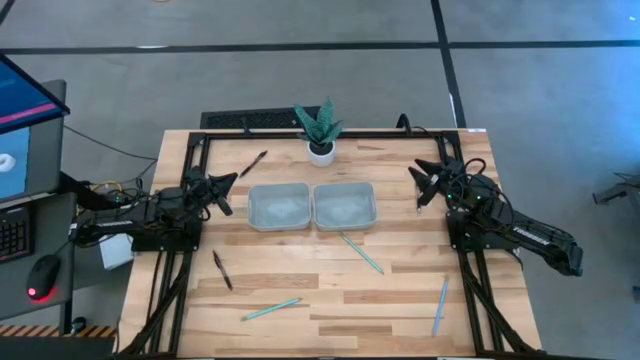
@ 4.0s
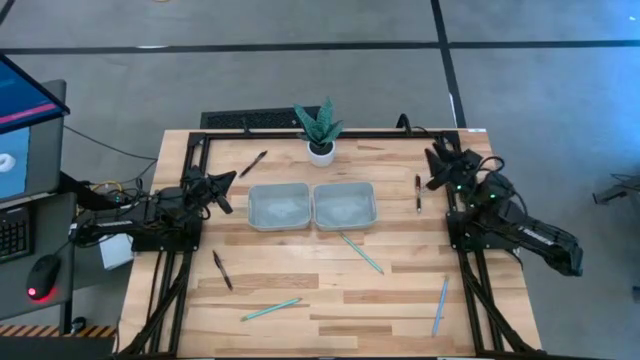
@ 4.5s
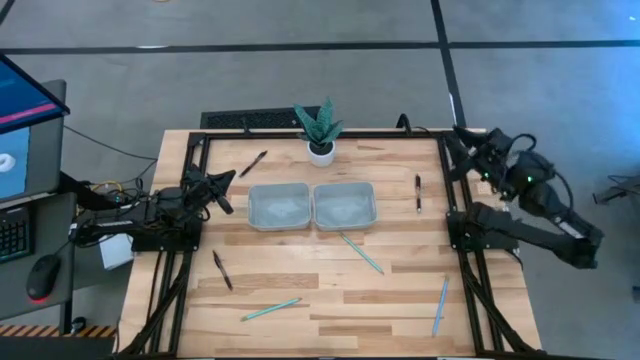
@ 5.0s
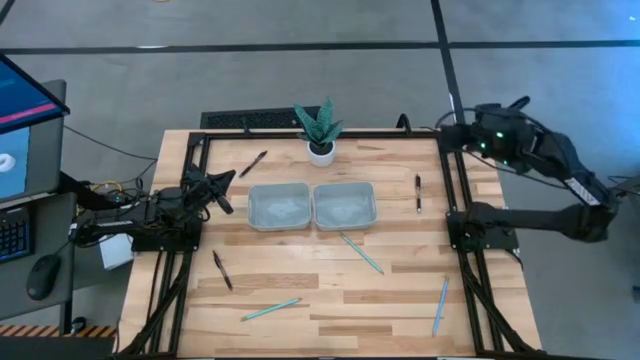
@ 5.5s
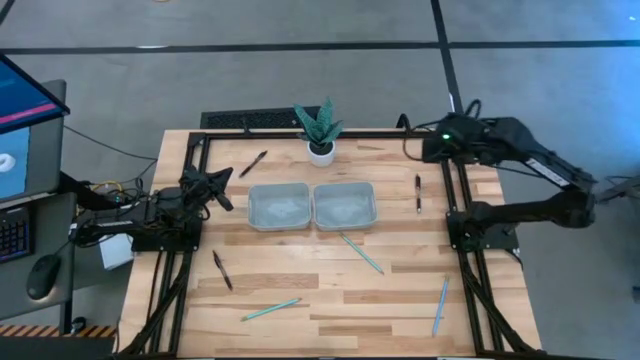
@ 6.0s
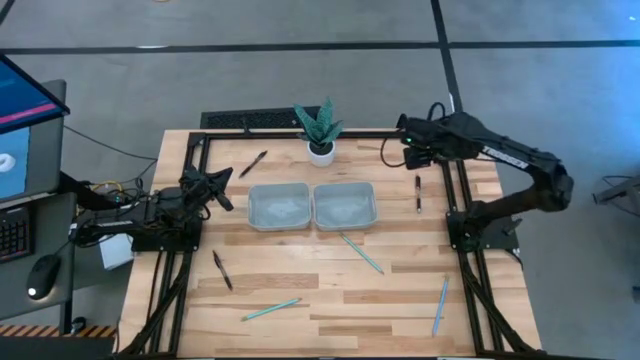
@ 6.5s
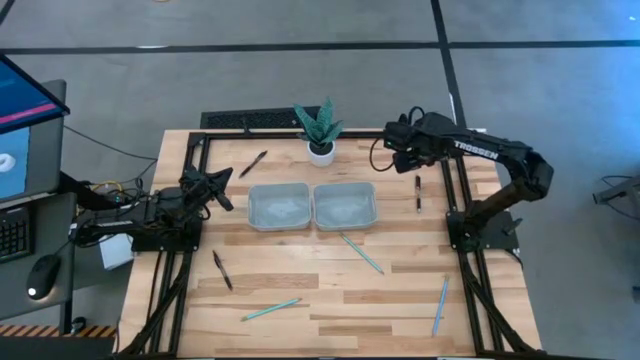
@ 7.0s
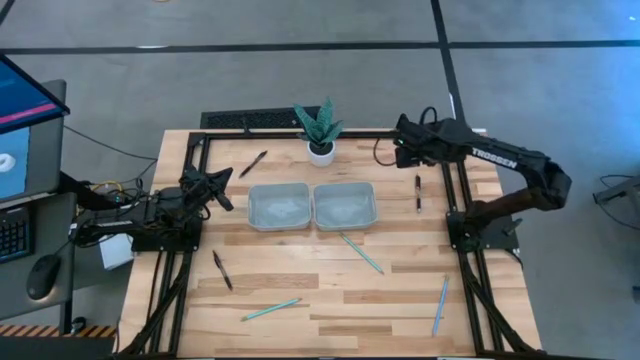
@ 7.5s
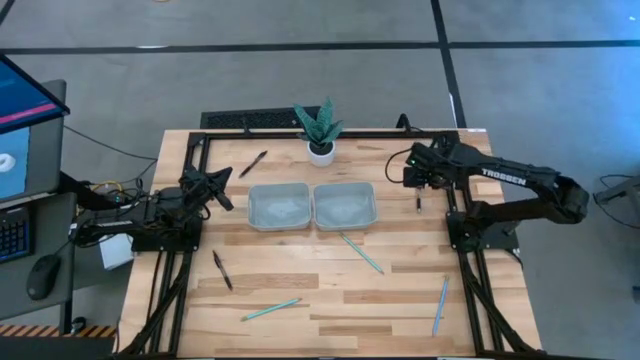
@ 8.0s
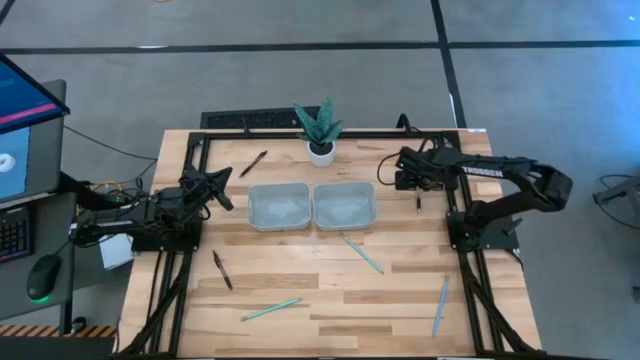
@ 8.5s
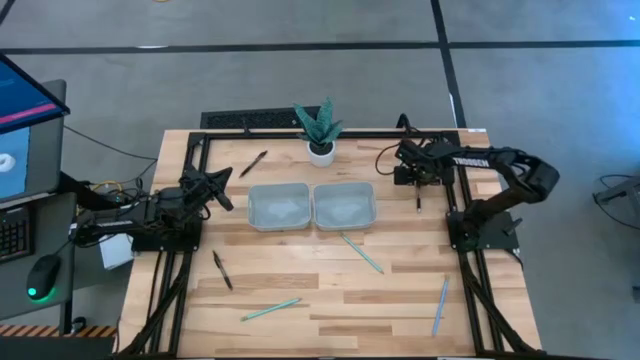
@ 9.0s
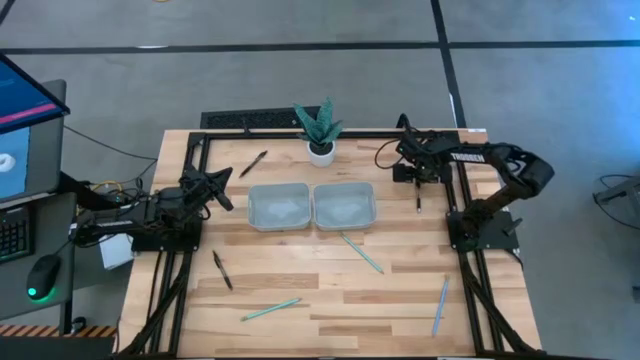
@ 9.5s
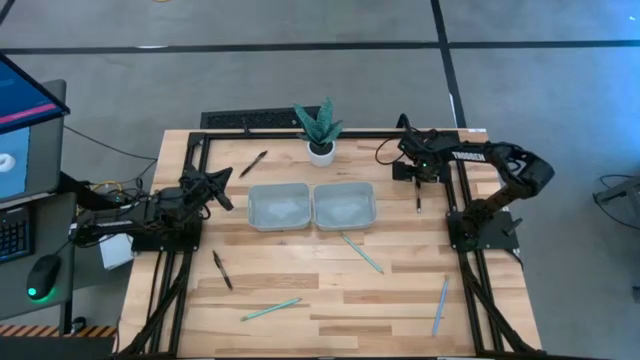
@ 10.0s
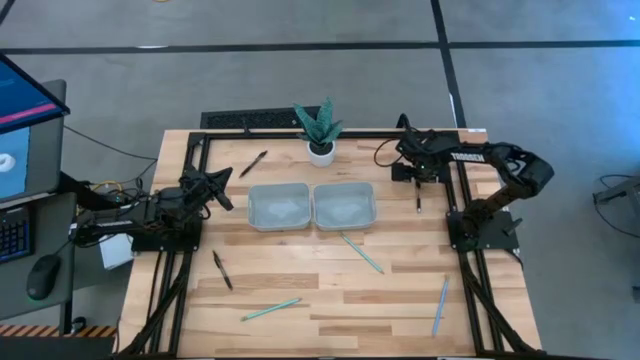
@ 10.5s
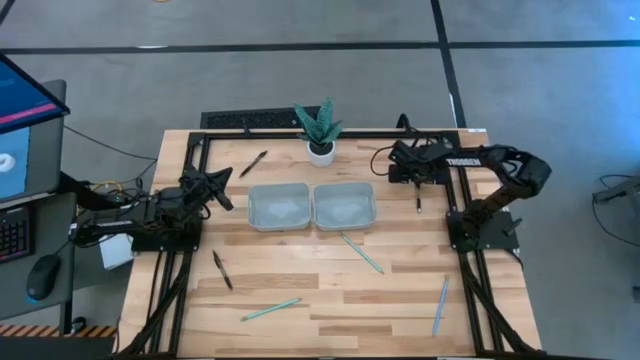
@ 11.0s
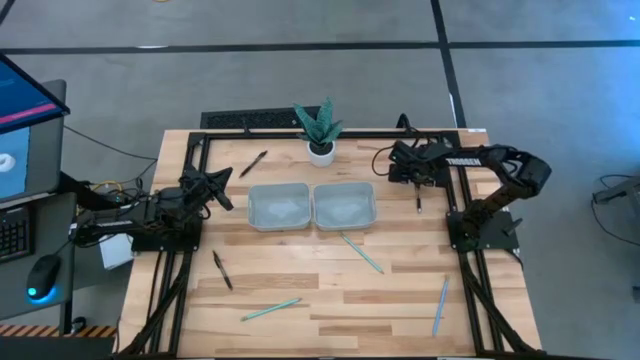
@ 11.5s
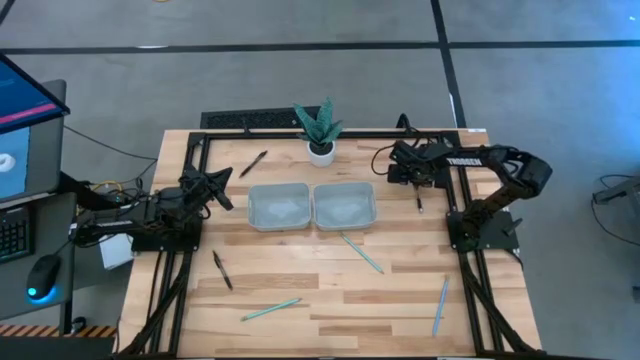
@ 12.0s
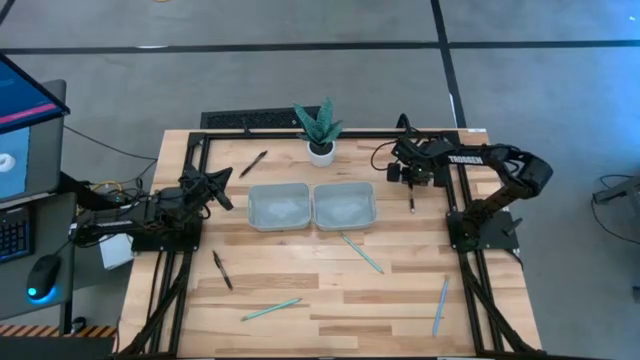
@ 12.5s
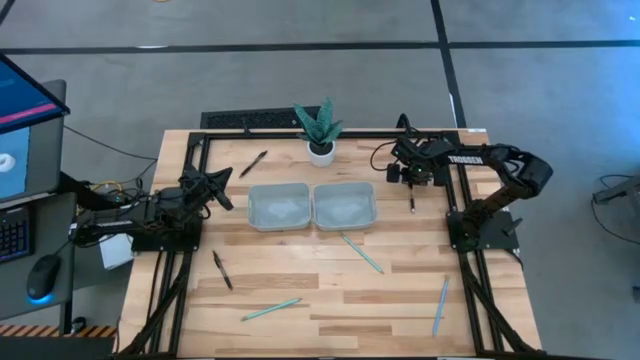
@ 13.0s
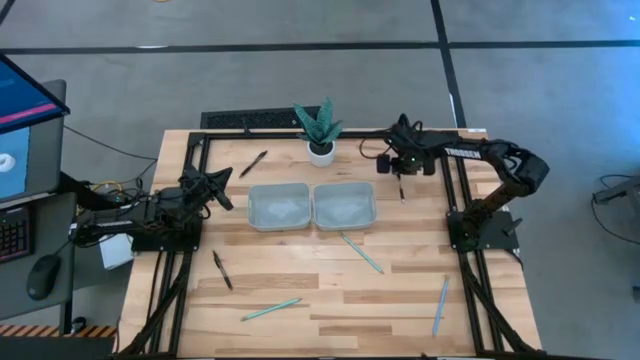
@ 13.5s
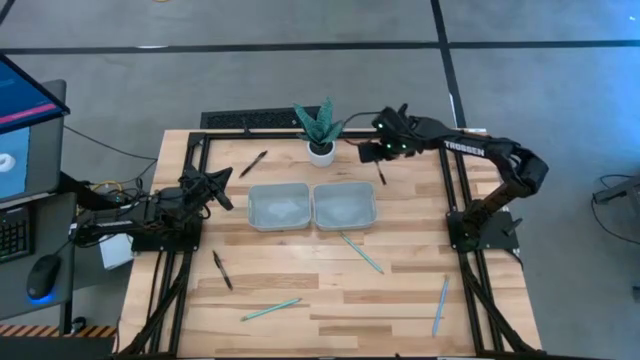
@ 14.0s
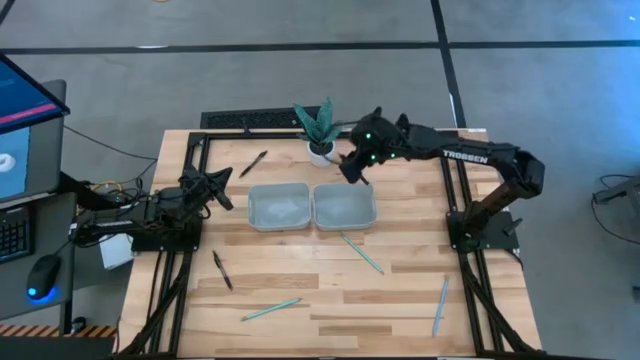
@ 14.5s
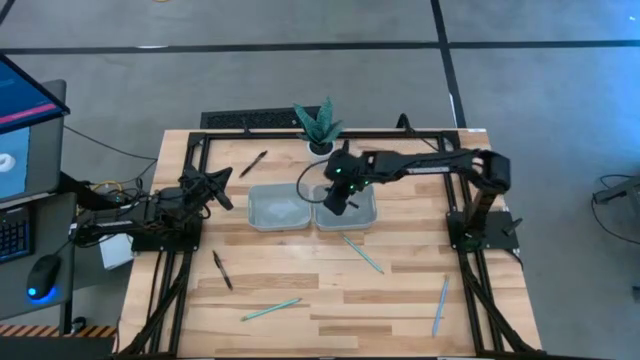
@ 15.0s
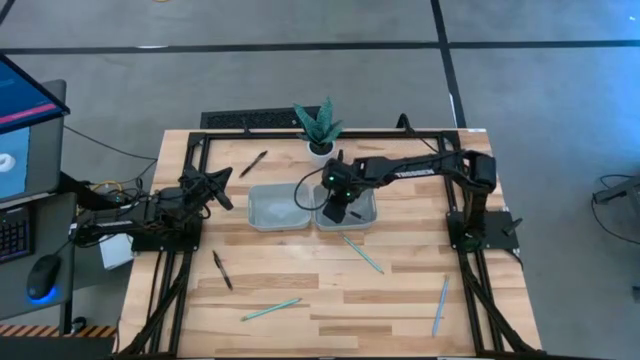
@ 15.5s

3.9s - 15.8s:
Task: Sort pens & pencils
Put the top right black pen into the right gray bin

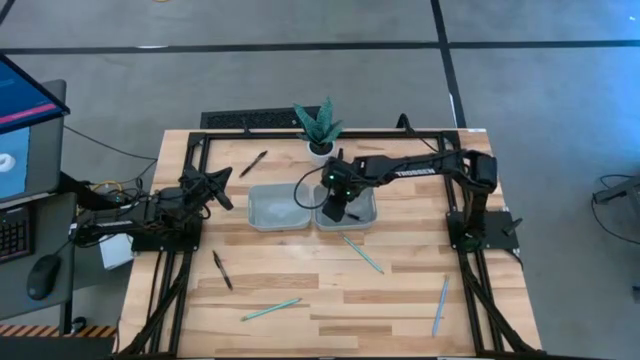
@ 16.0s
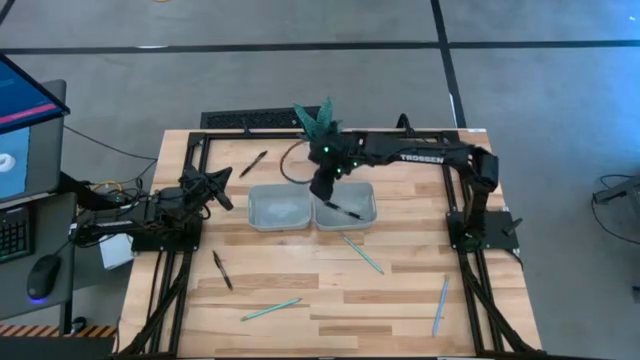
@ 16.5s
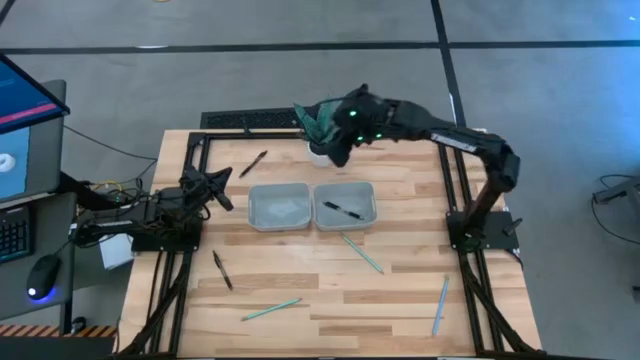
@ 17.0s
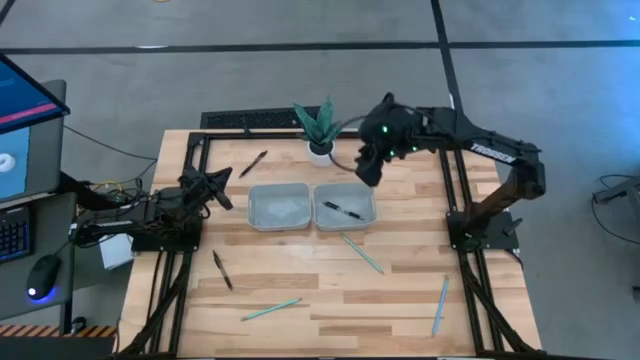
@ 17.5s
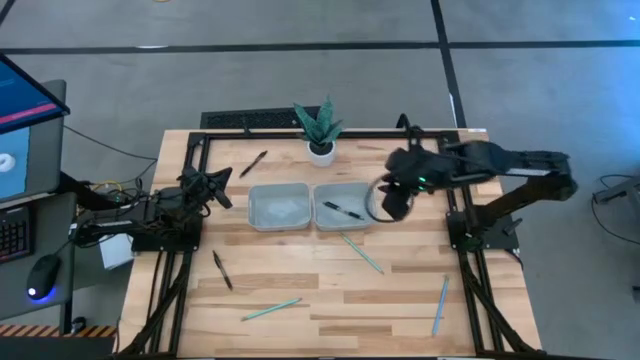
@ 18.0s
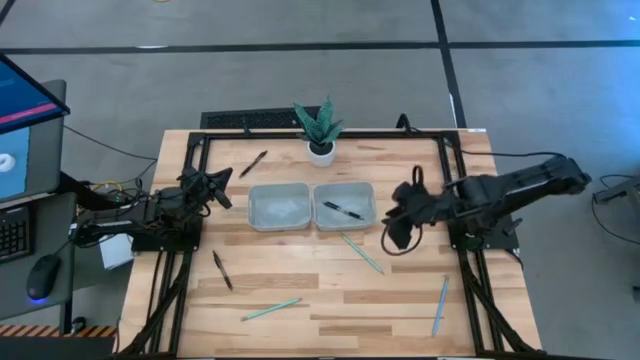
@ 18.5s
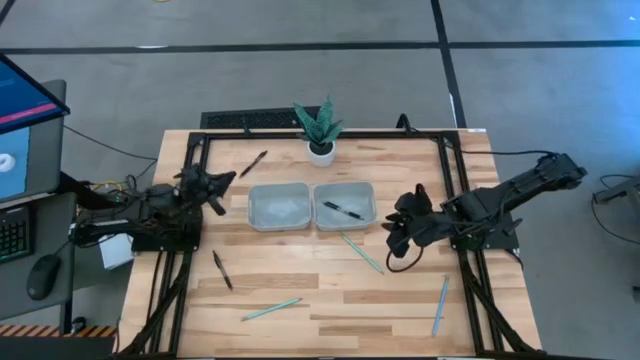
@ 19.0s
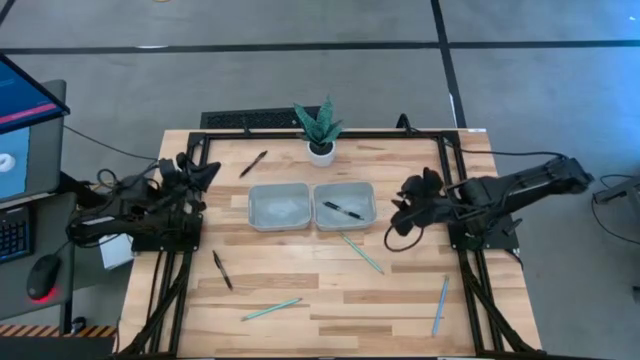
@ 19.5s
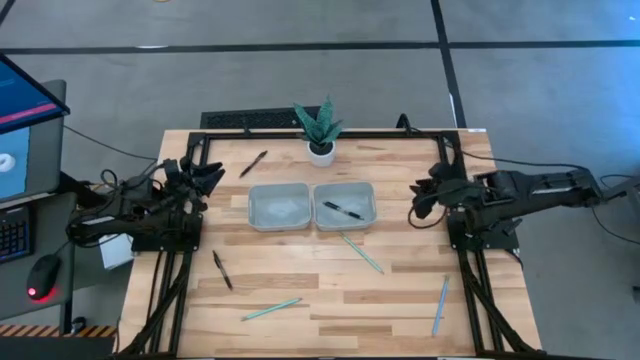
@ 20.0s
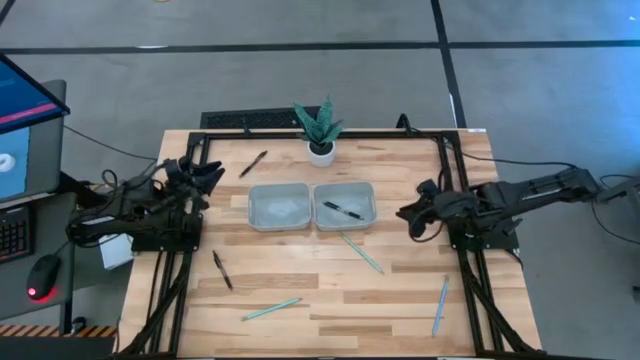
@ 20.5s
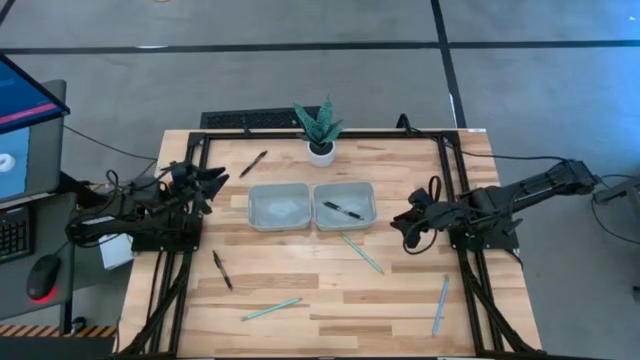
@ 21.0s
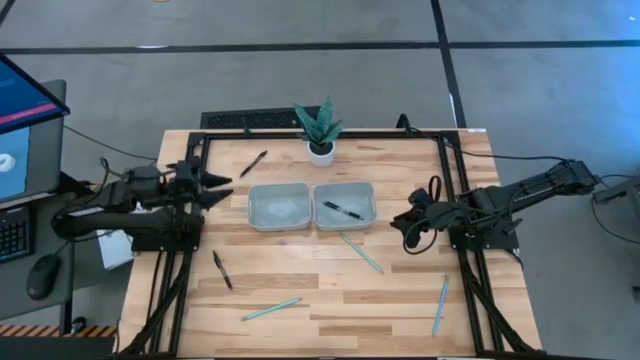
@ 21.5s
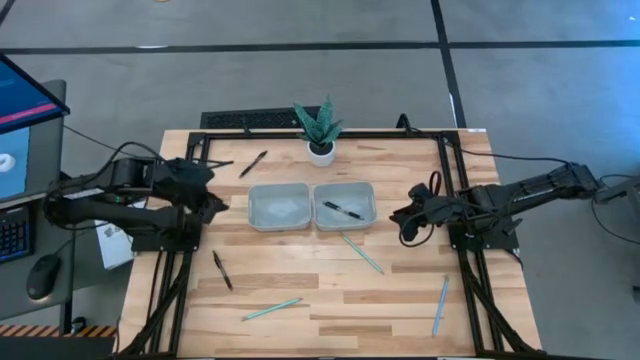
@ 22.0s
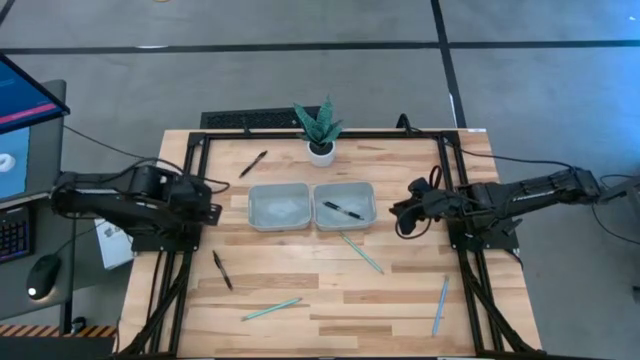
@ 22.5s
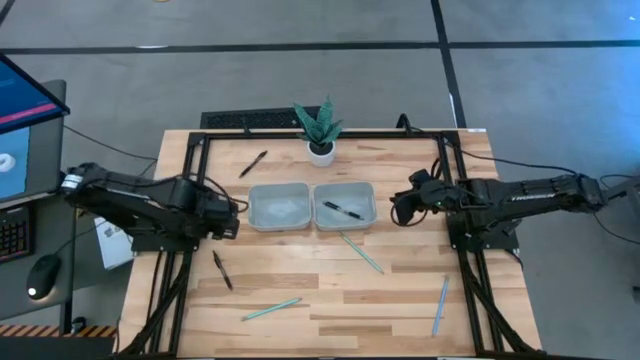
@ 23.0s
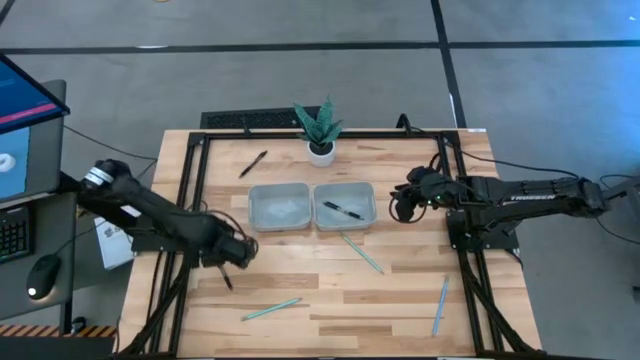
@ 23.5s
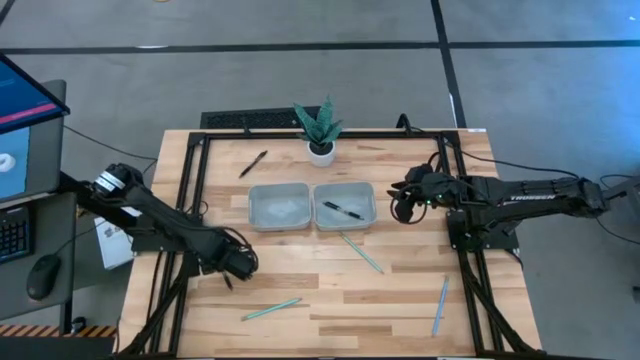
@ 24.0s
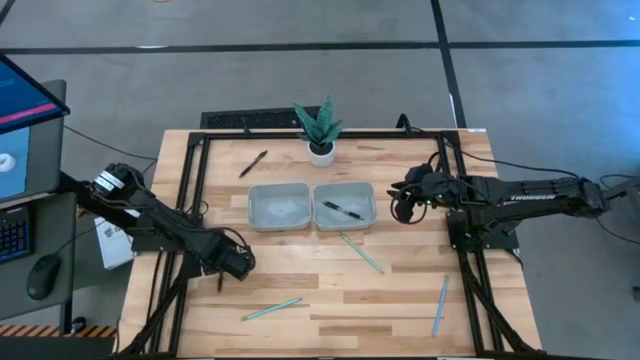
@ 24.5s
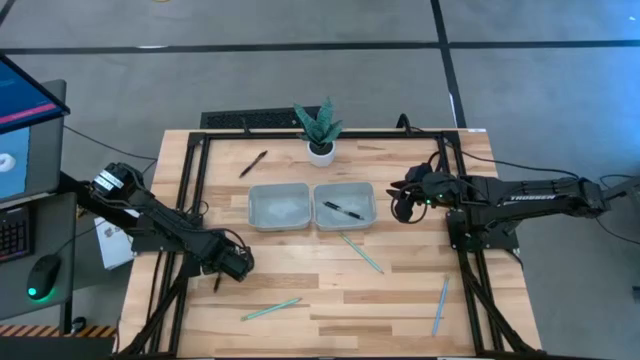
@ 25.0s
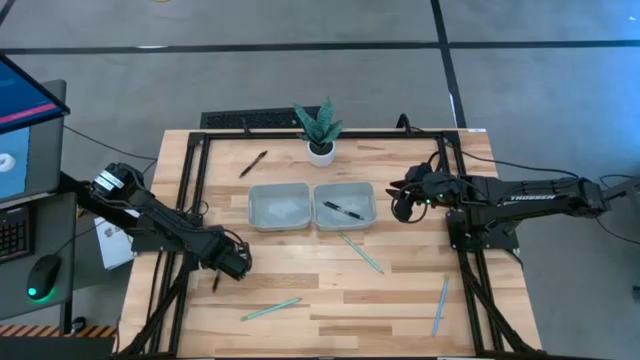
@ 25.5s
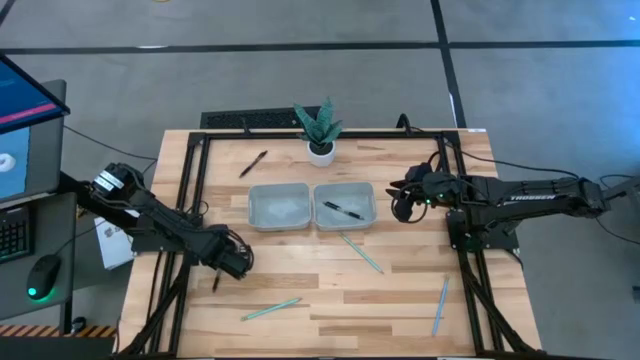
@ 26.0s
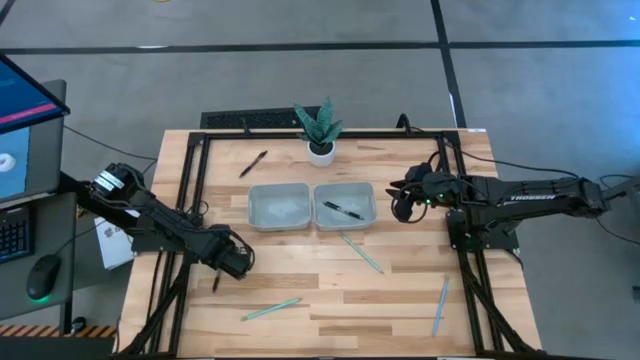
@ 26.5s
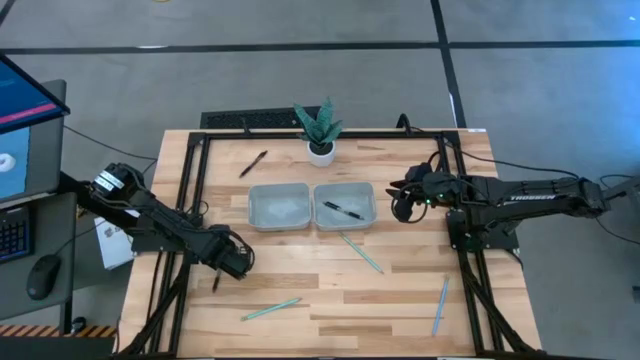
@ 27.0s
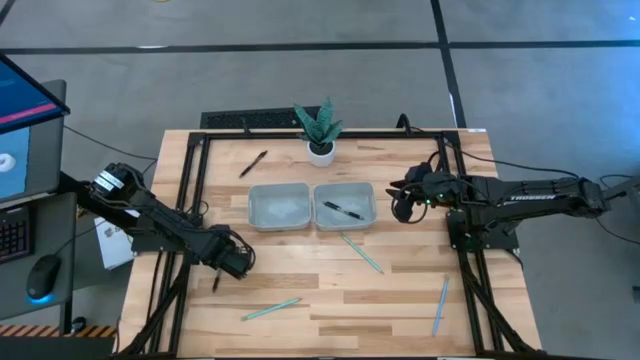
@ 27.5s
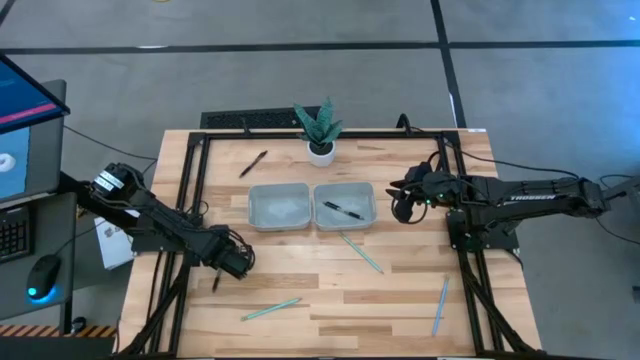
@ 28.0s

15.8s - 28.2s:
Put the bottom black pen into the right gray bin
